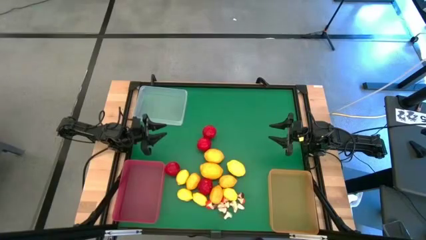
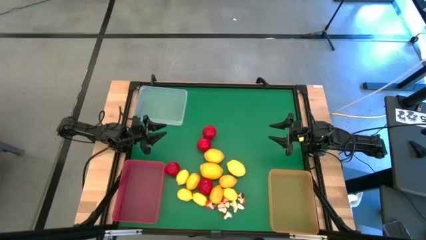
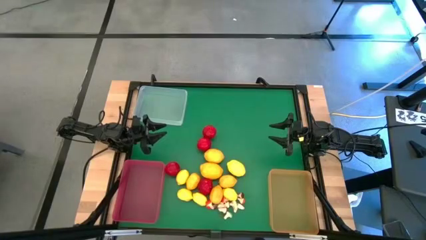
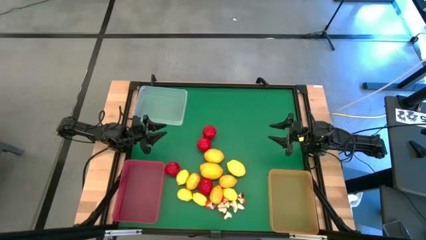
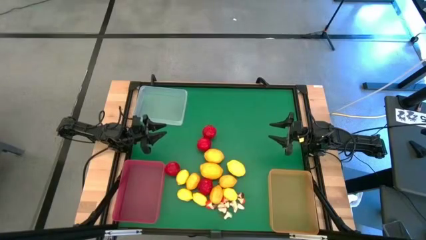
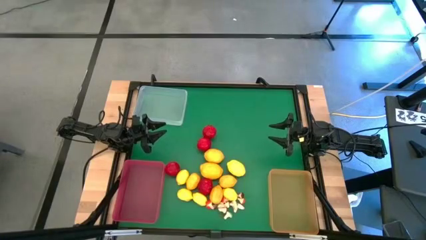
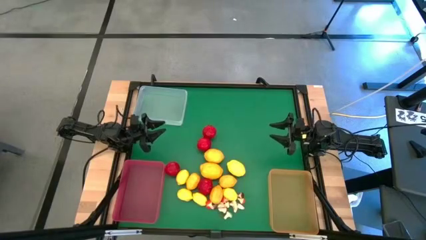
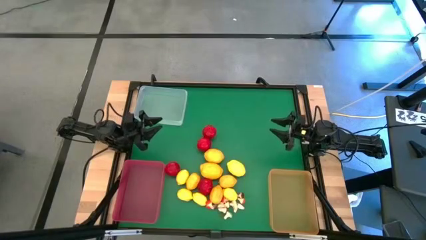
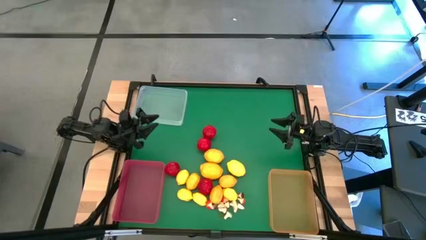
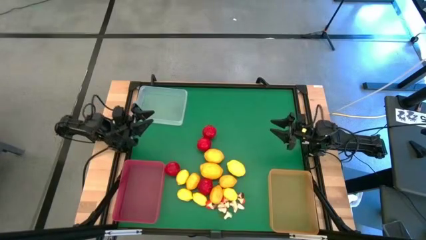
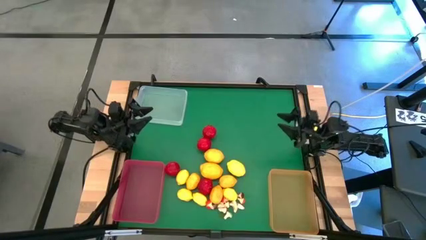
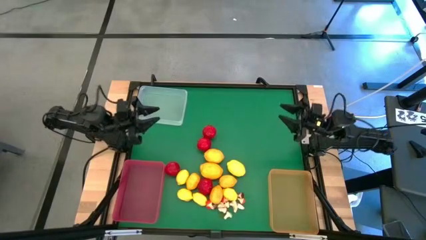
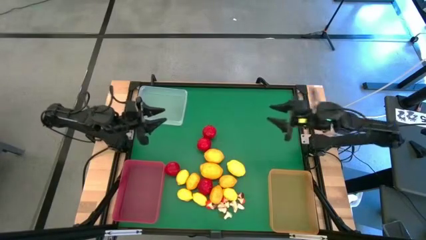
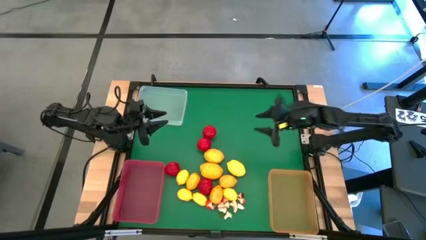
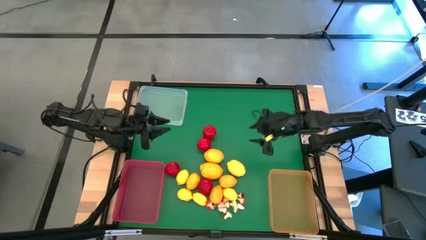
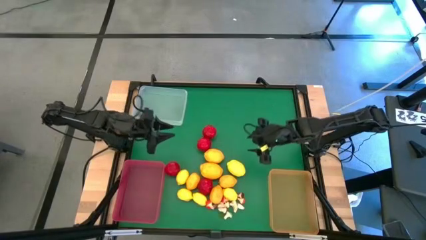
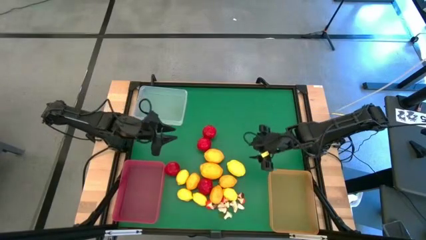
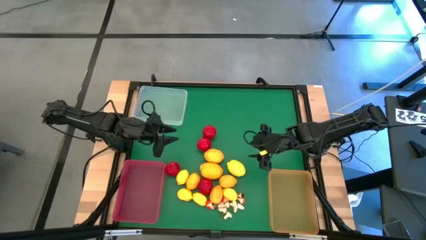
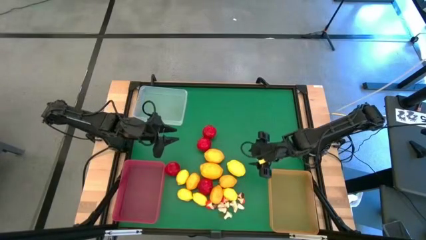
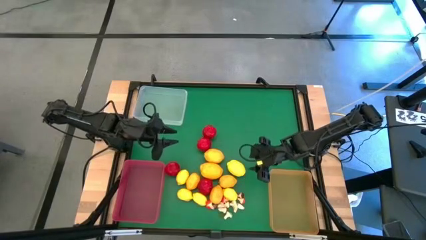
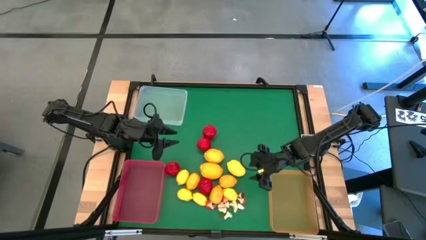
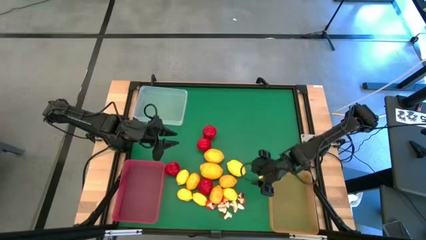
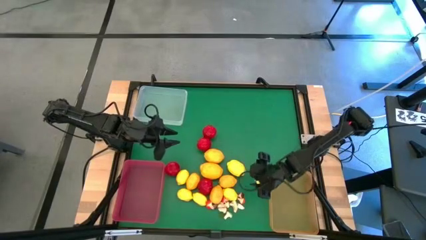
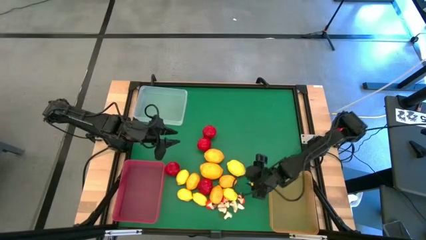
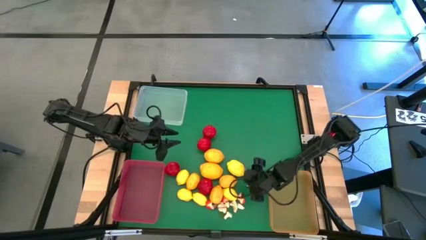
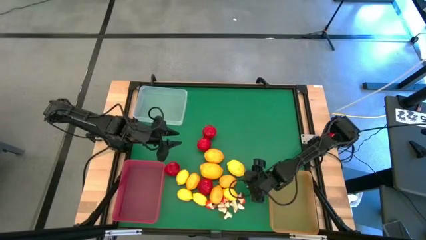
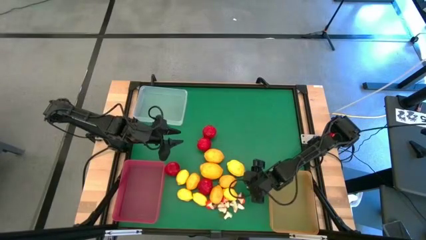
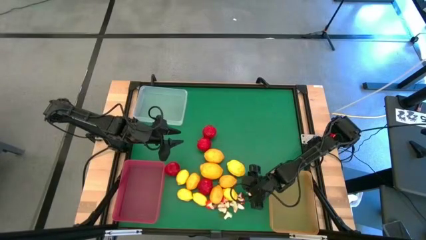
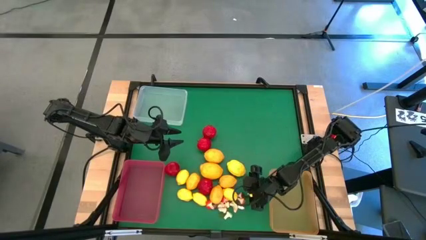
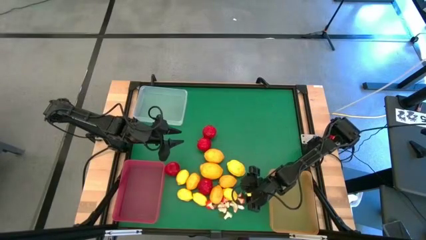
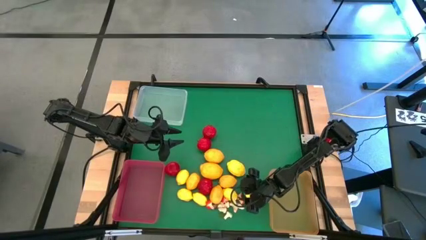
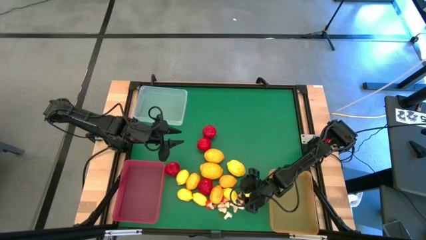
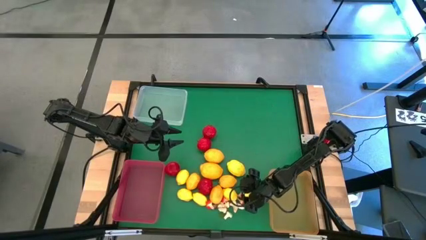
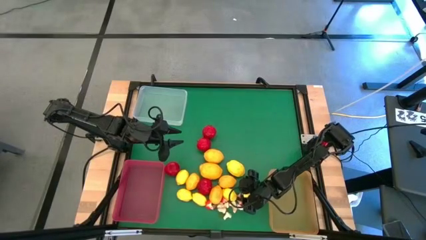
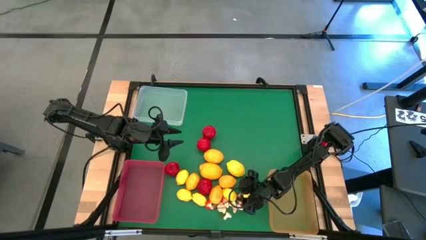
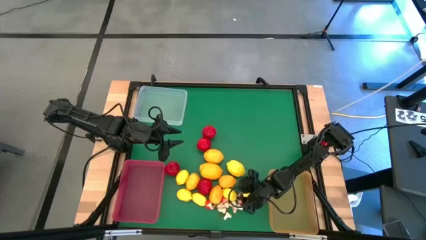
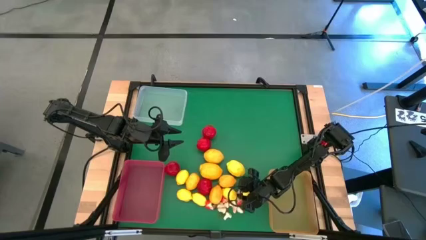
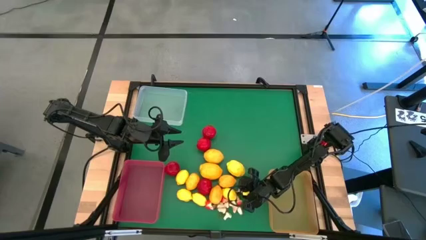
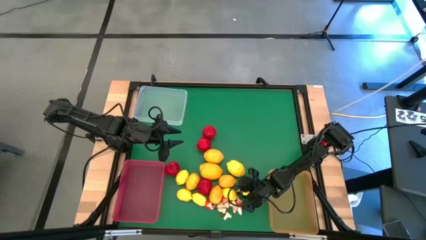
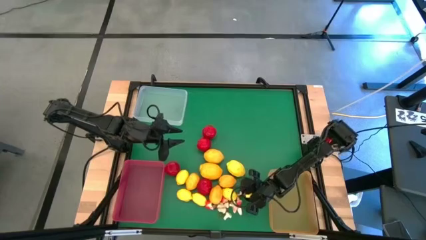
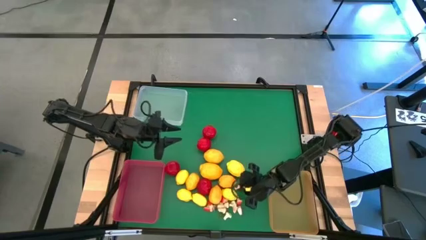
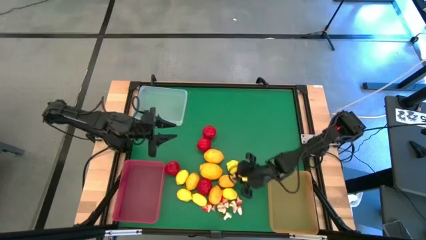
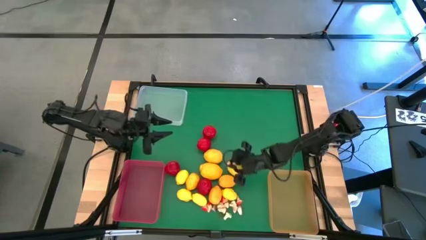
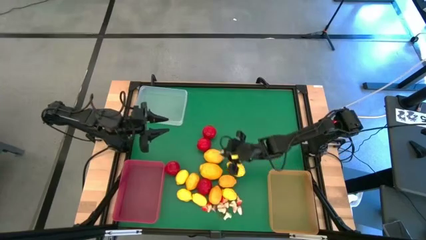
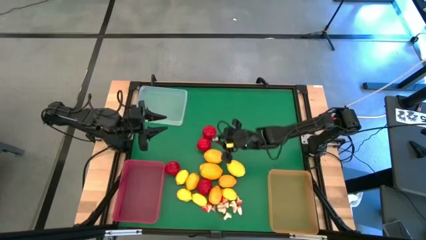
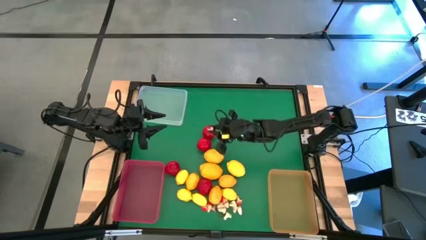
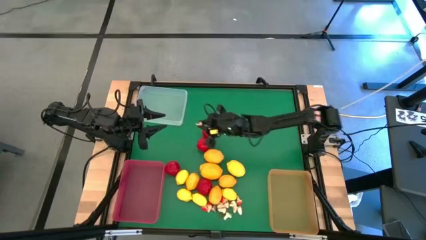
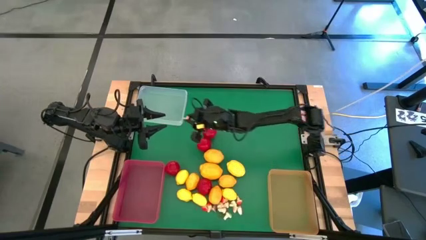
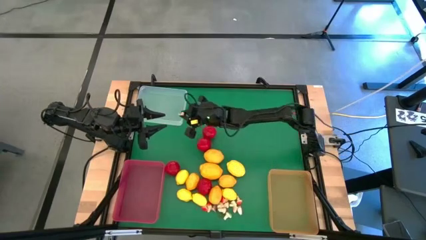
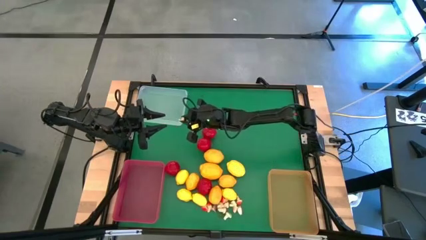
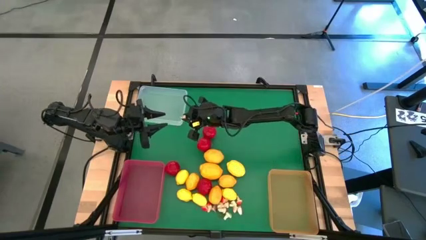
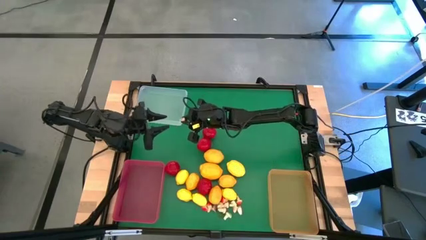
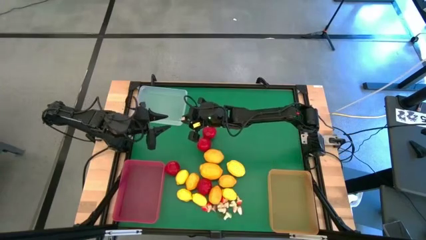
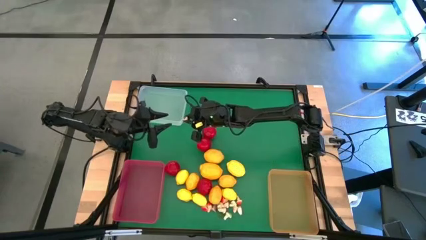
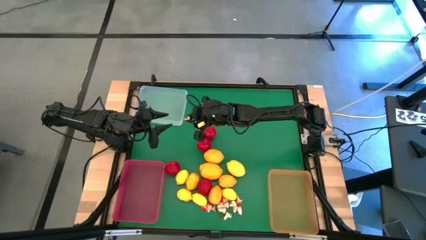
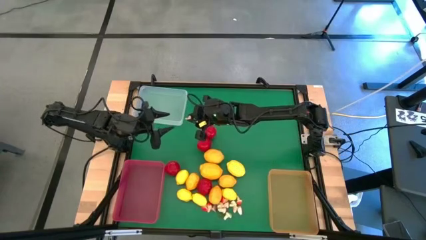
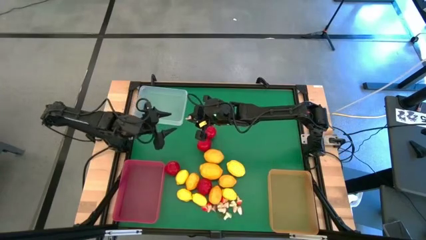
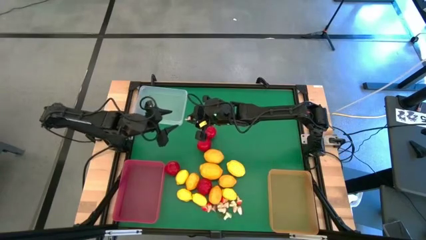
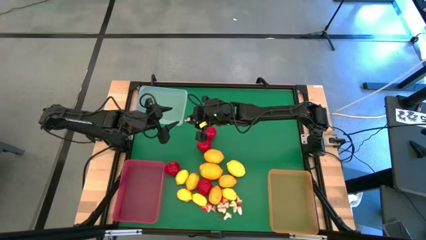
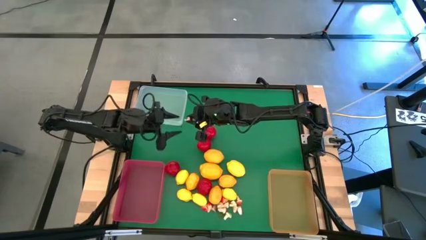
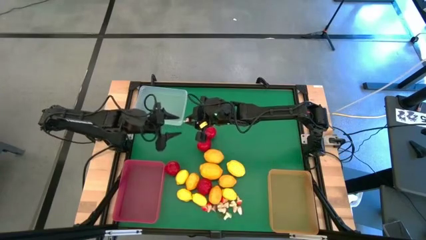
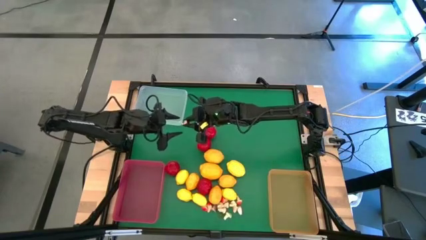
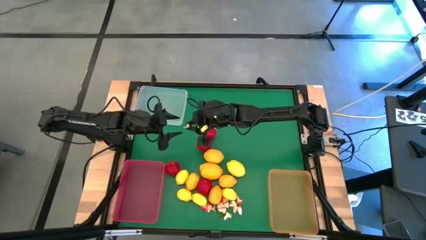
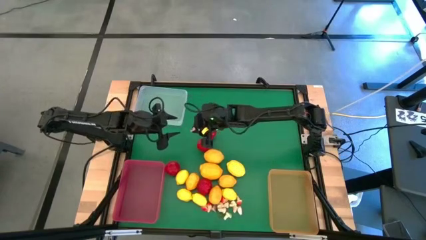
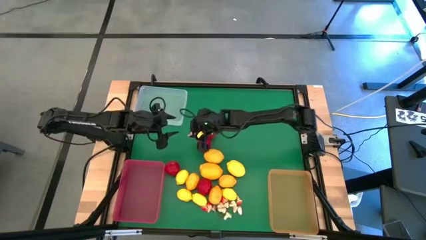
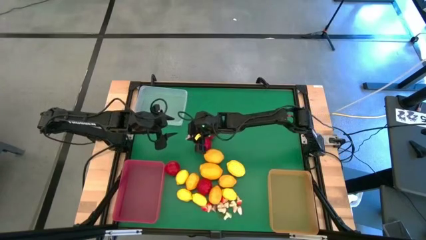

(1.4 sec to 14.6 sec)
Task: Sort produce into baskets
Put the brown mushroom into the white bin

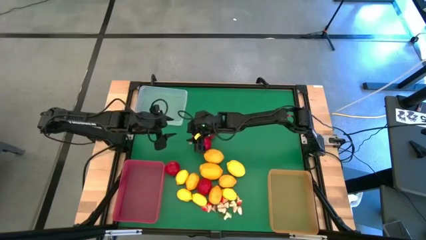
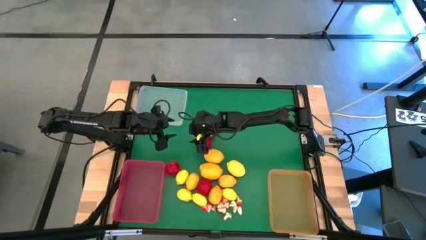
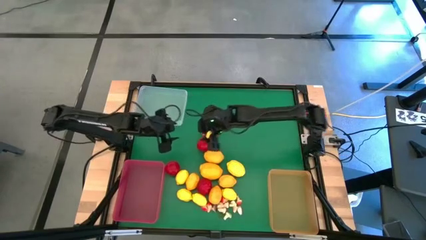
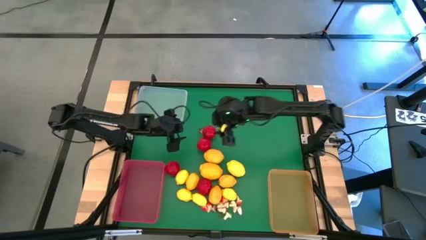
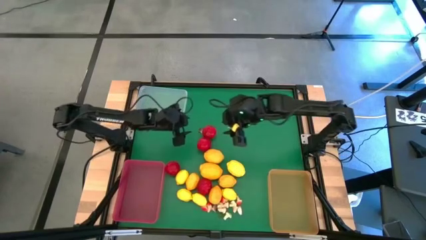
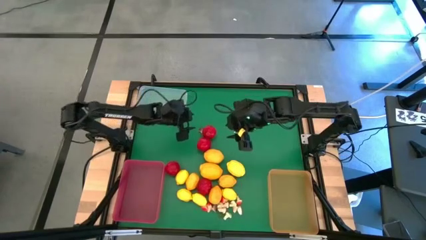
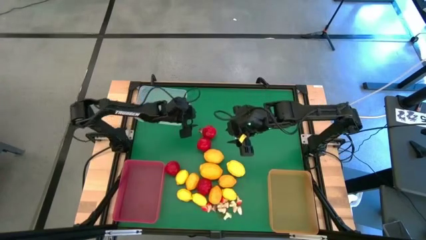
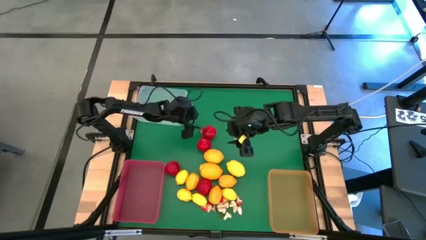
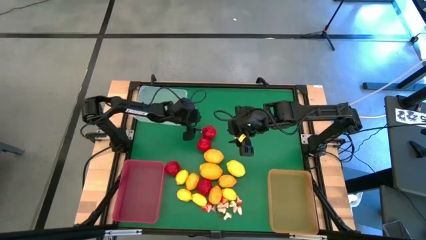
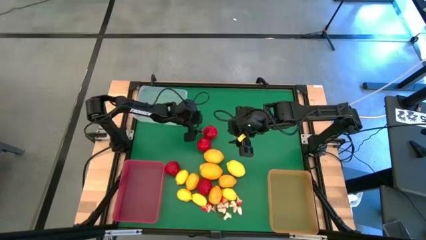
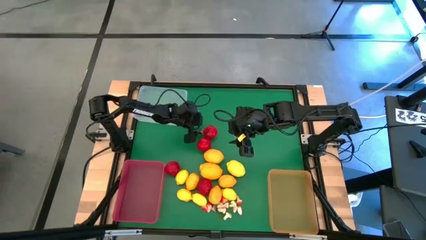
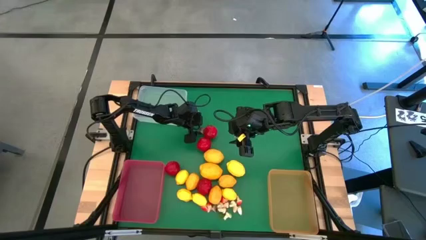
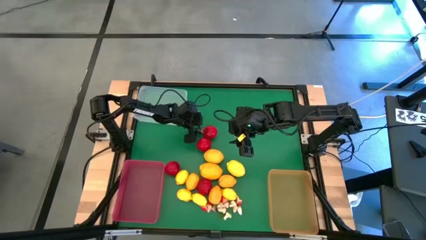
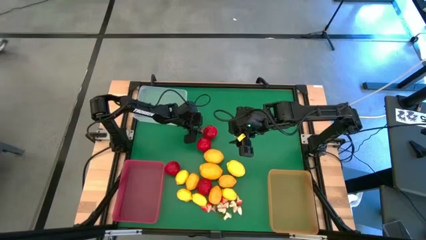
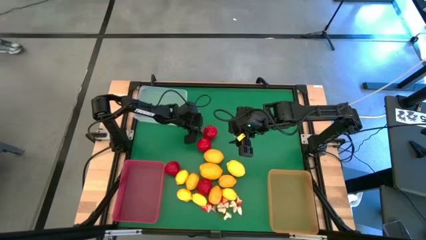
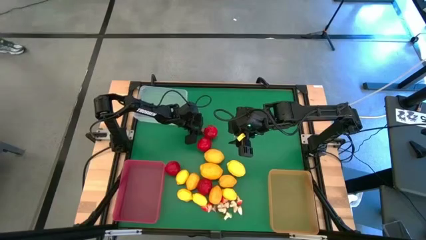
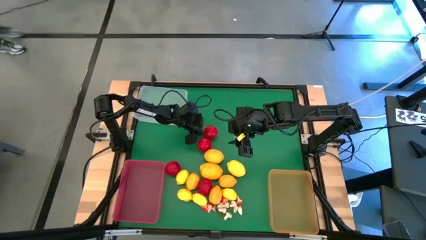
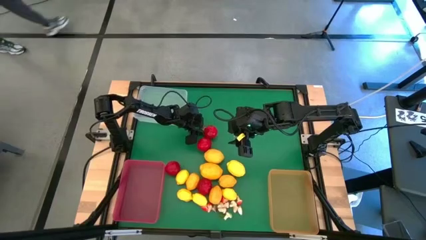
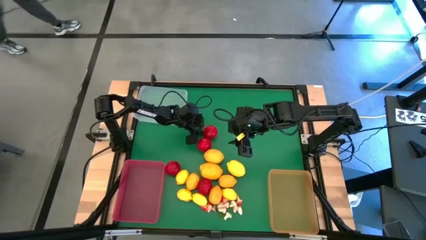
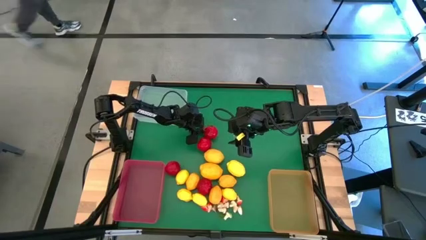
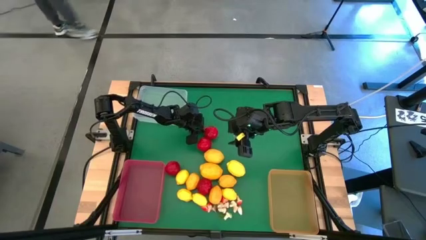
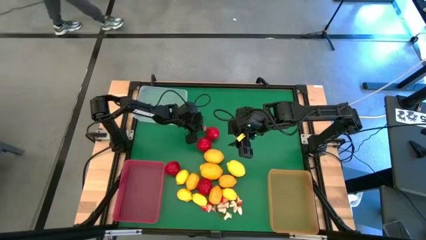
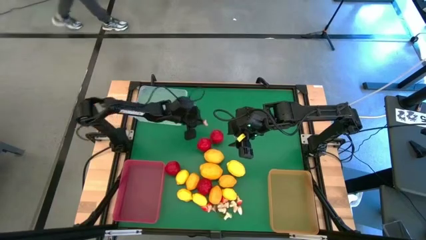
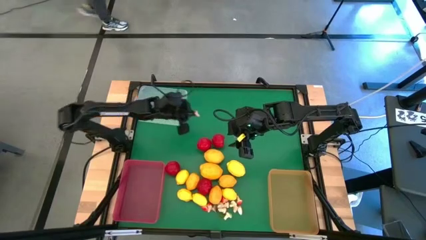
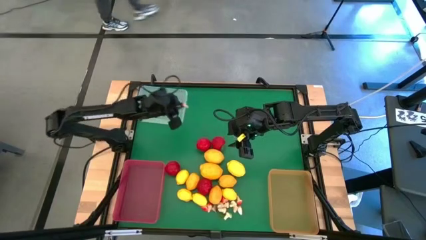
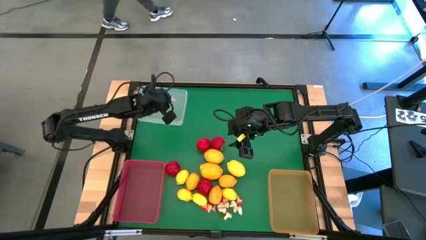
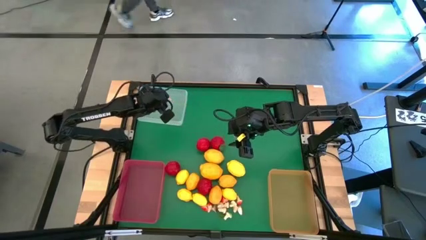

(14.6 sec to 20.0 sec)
Put the brown mushroom into the white bin
